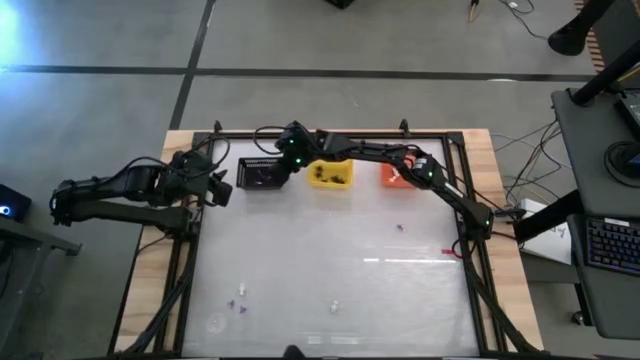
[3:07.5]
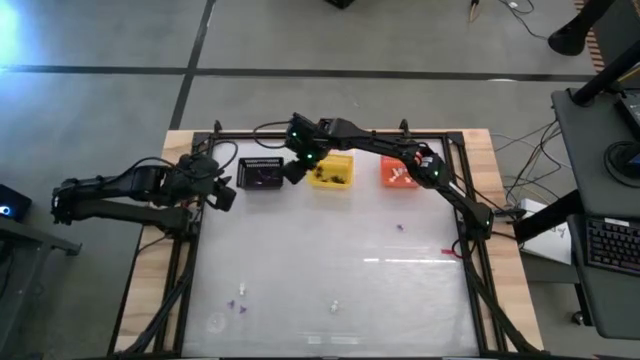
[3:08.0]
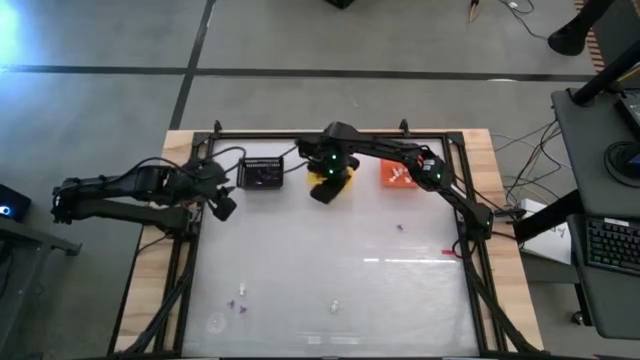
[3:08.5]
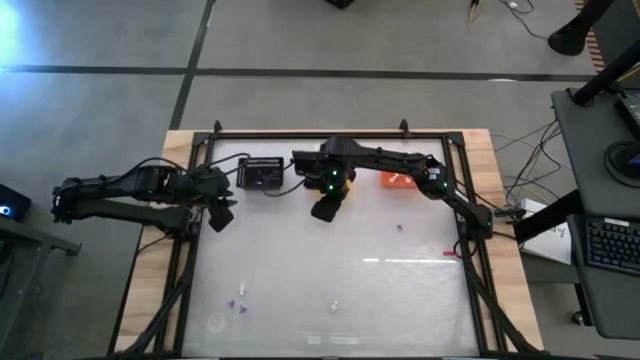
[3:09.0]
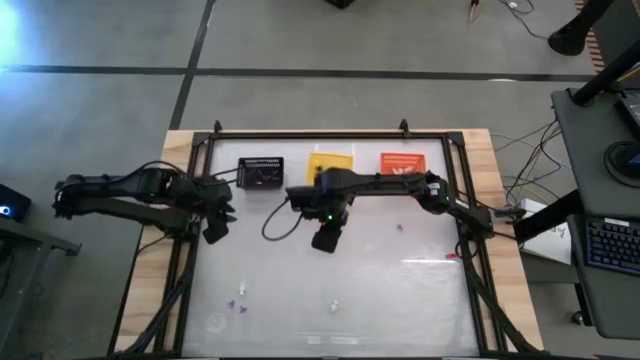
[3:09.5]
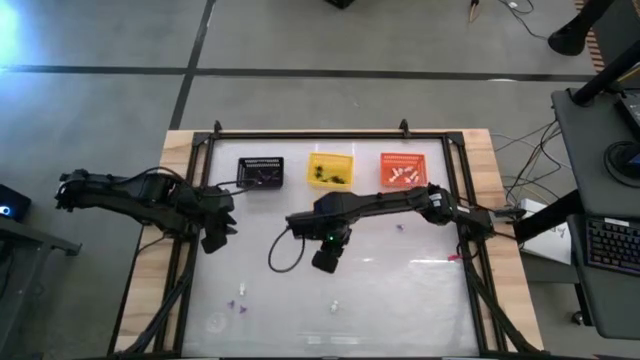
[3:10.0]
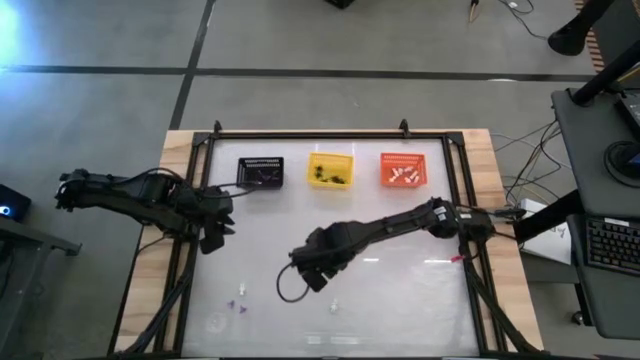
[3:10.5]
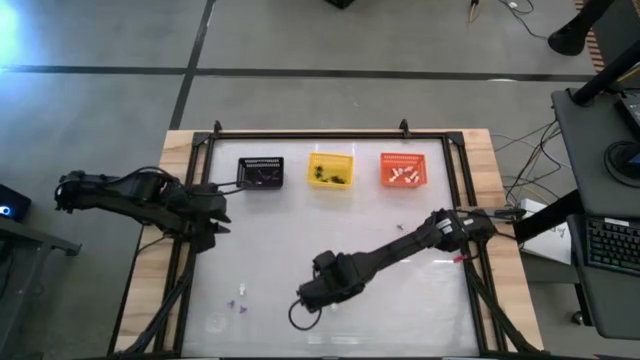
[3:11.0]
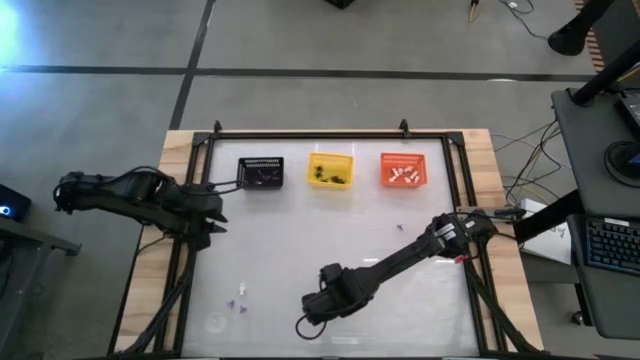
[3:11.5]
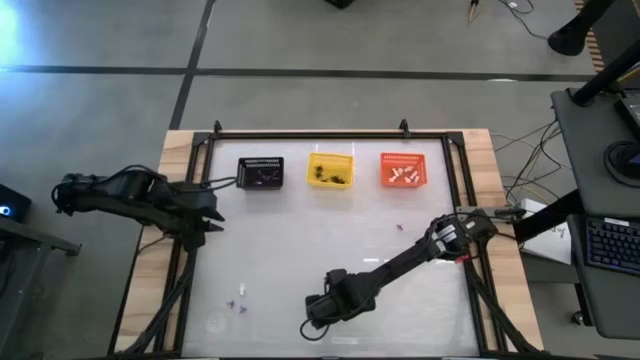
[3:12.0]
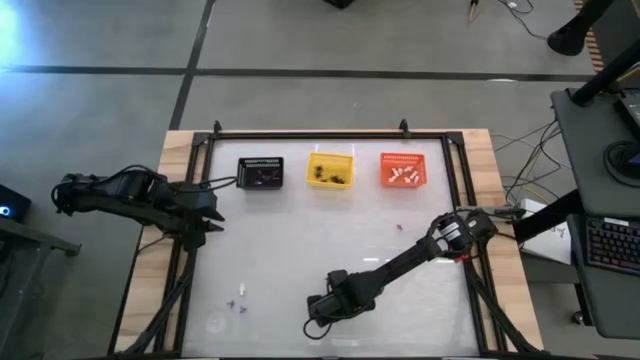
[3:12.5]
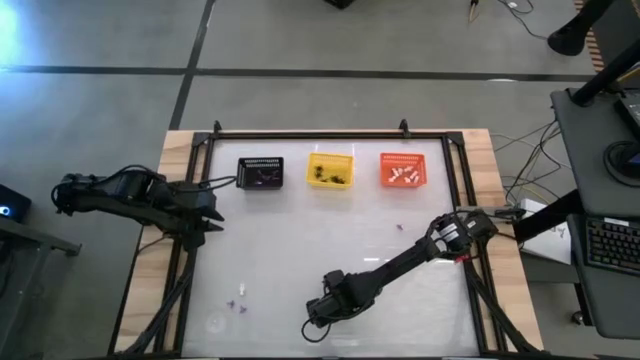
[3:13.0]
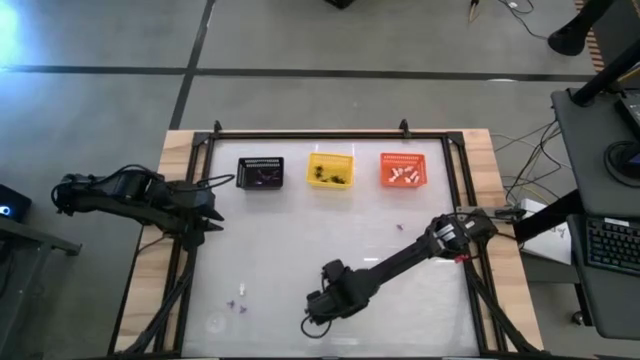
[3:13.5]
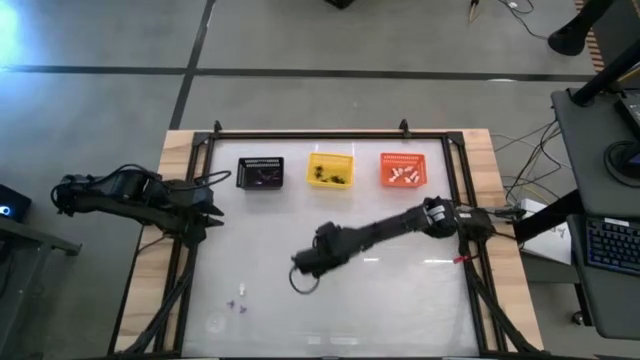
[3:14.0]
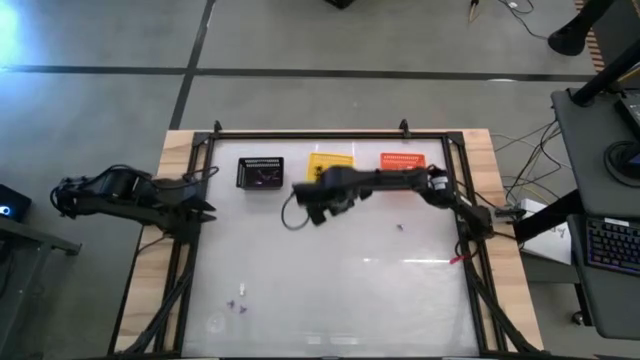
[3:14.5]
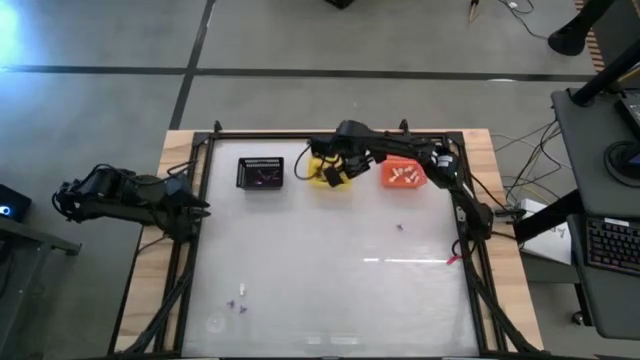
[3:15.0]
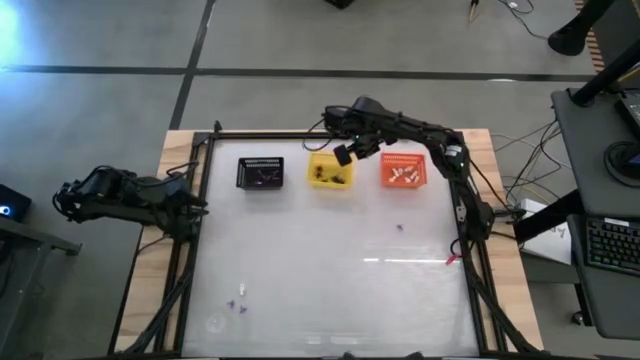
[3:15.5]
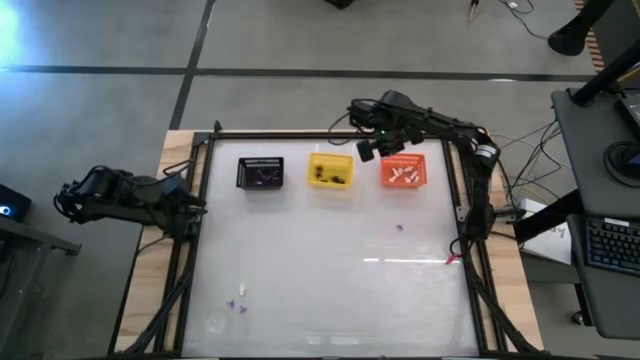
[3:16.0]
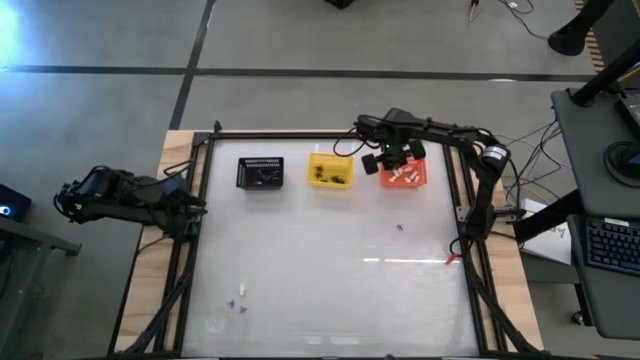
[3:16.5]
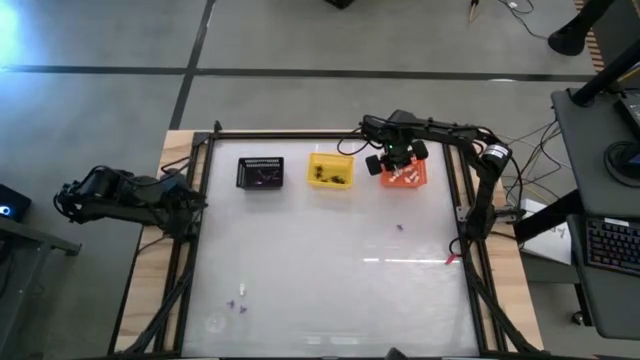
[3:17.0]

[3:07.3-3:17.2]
Task: Sort Halloween decoration
Put the white skeleton toy into the orange bin

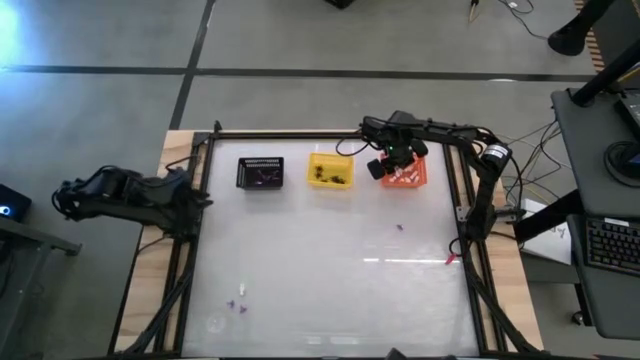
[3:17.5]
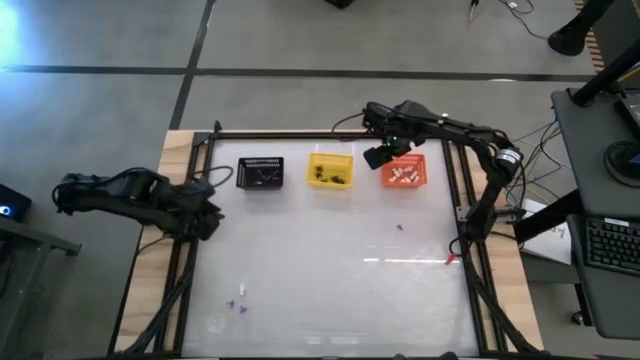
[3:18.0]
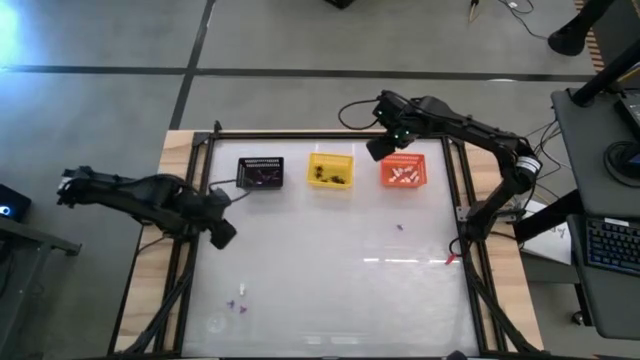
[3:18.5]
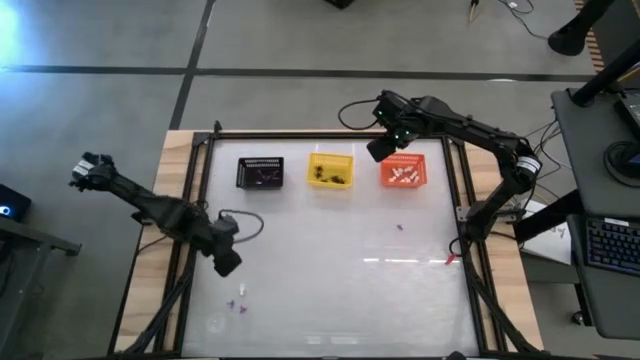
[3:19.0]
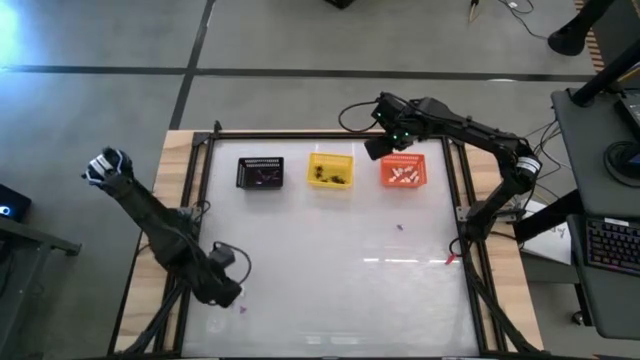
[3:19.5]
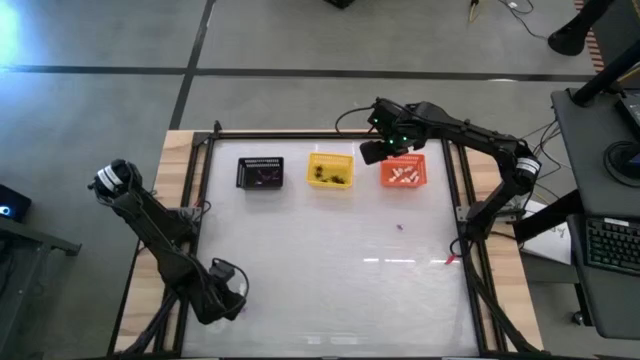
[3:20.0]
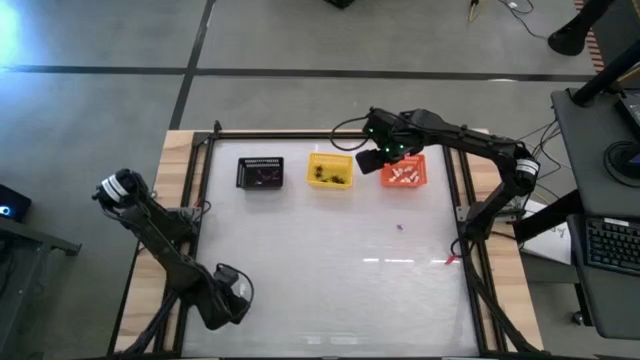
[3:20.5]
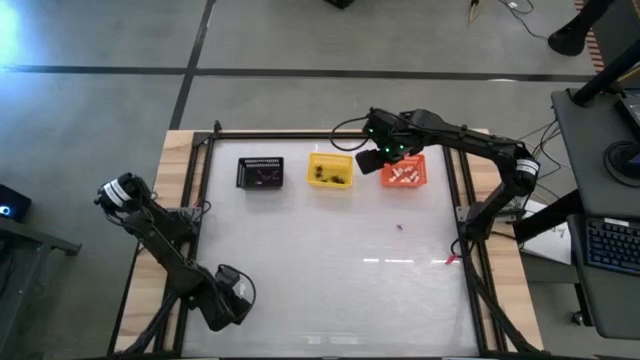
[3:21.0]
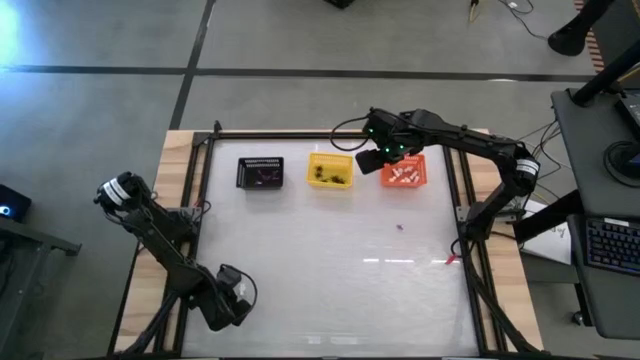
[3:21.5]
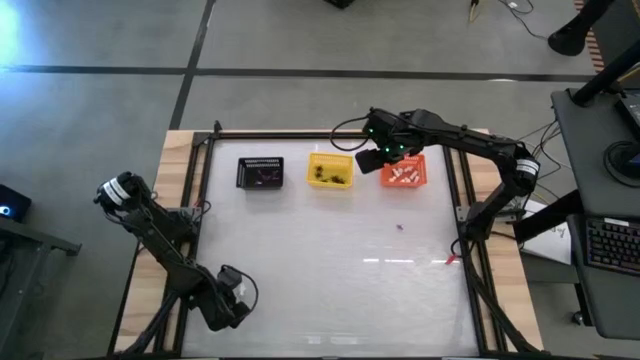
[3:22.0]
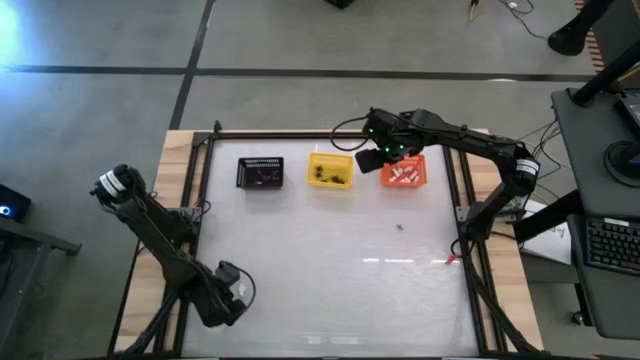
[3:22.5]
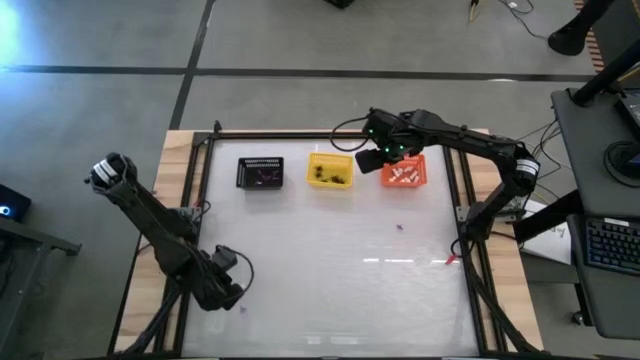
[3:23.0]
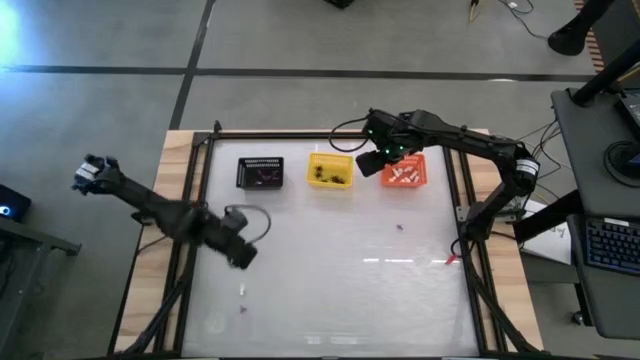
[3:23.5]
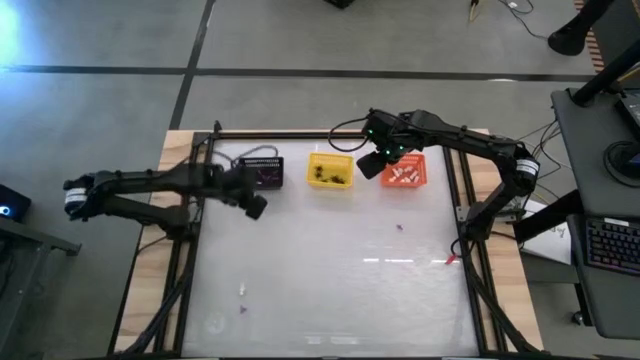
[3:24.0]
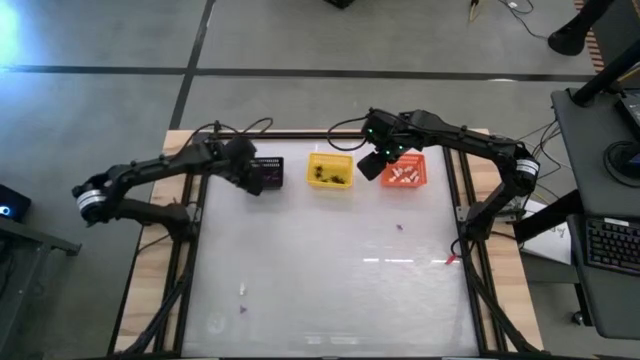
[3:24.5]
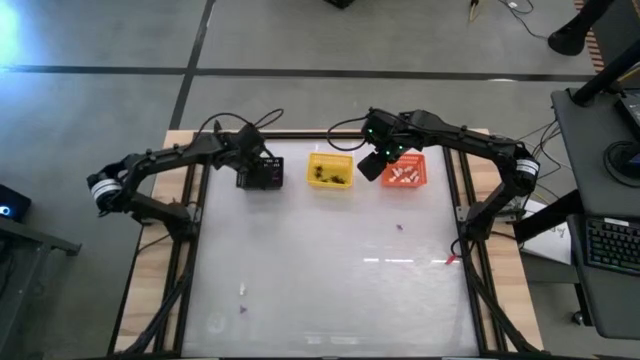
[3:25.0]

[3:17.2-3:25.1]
Put the violet hat toy into the black bin

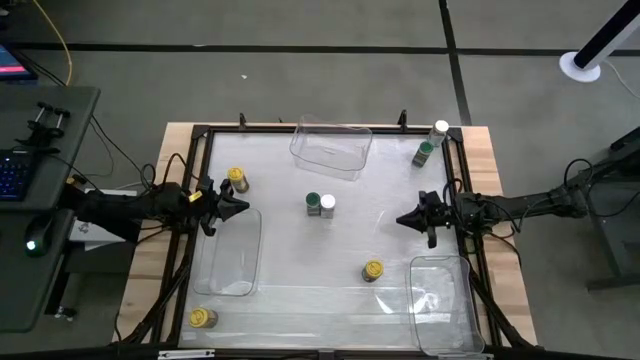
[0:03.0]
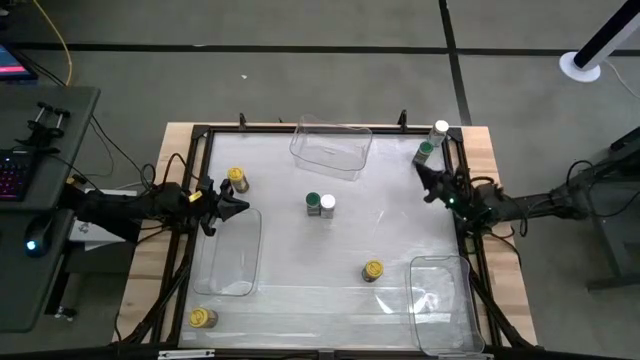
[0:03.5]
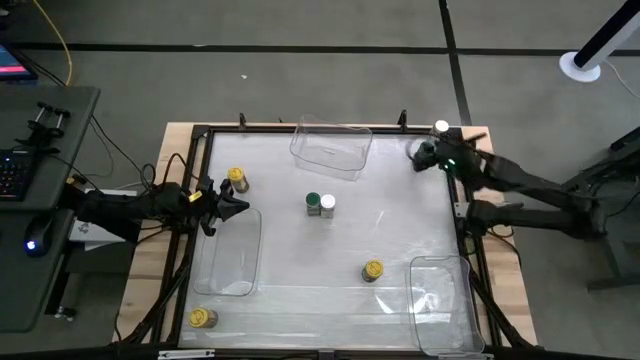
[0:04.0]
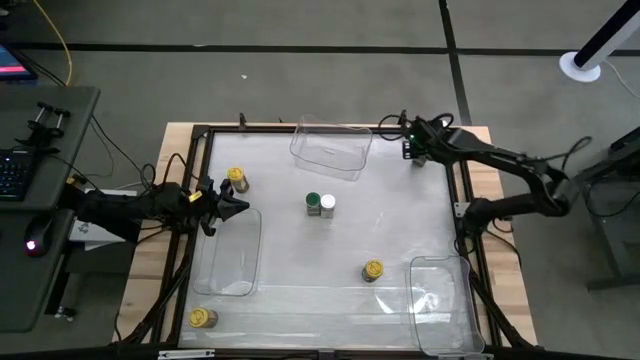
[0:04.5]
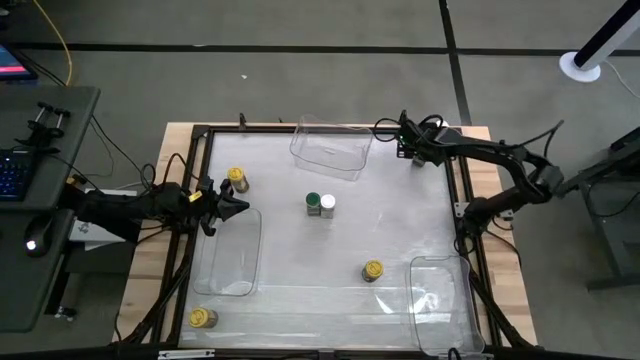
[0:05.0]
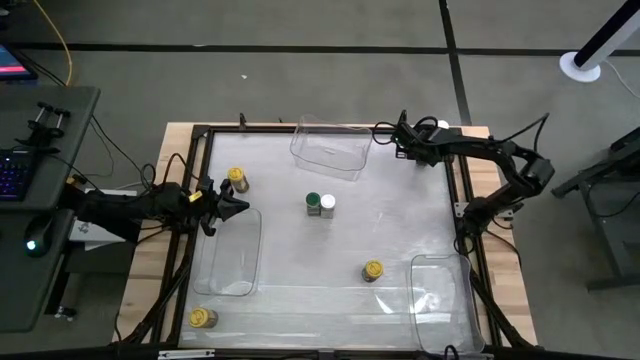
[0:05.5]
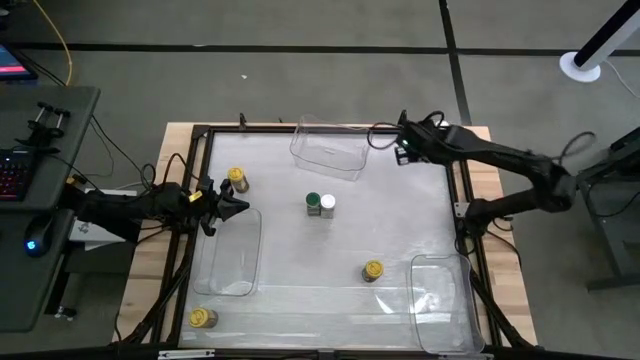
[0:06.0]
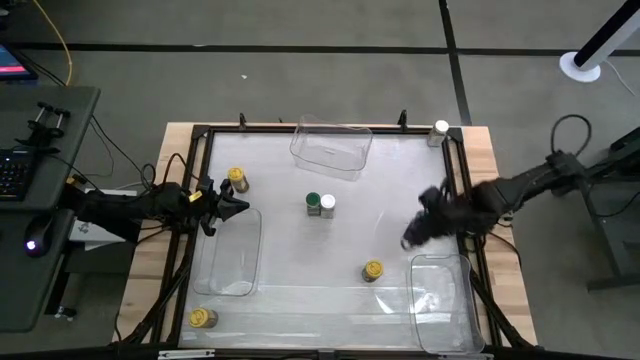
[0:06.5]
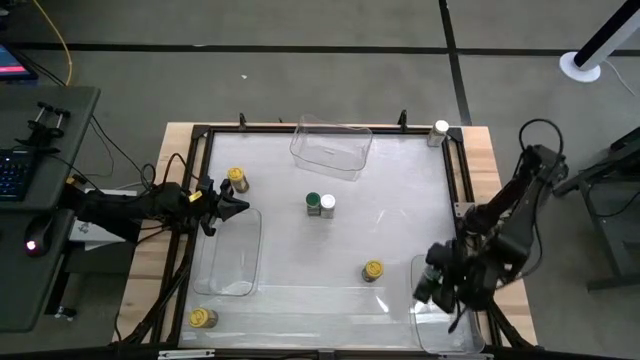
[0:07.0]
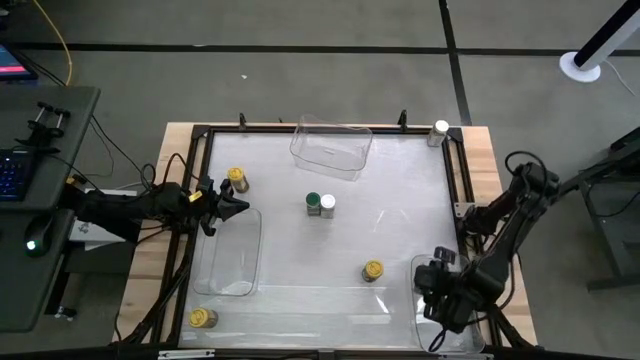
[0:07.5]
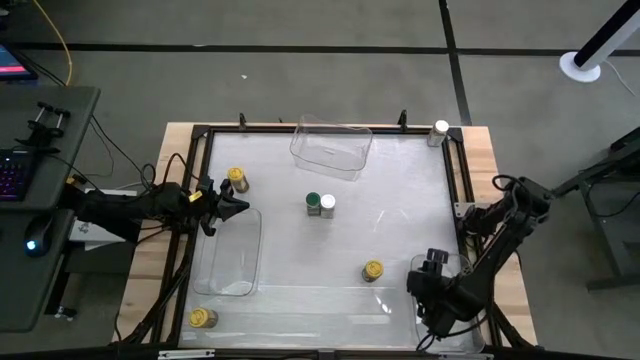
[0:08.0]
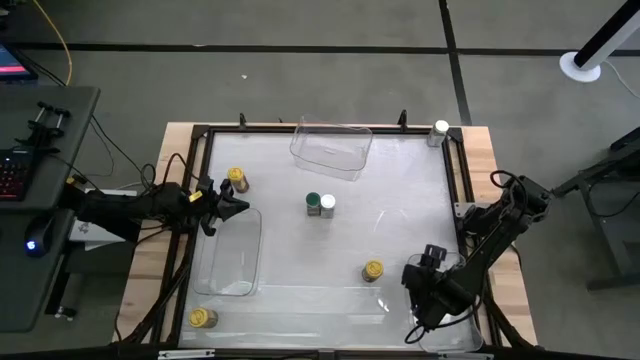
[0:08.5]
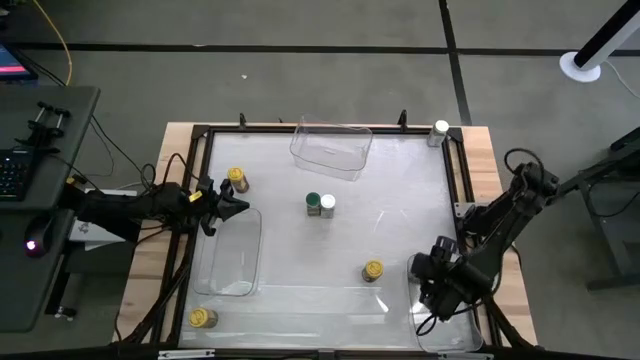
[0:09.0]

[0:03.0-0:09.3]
Task: Sort spices by type
Put the top green seasoning bottle into the right transparent bin
